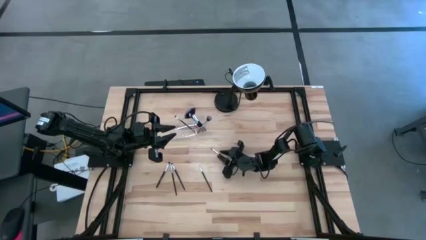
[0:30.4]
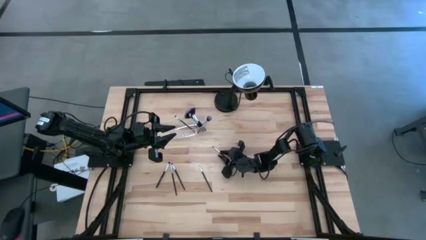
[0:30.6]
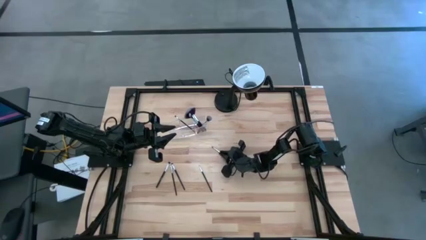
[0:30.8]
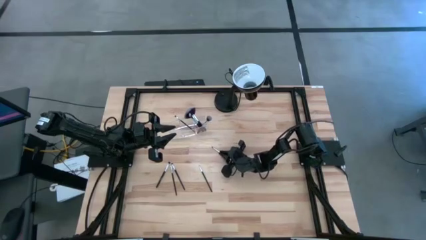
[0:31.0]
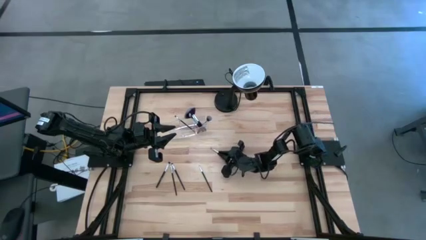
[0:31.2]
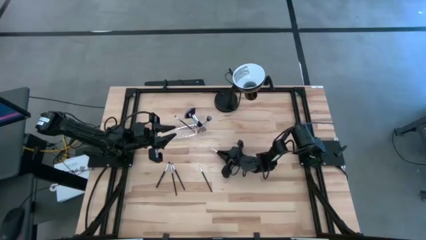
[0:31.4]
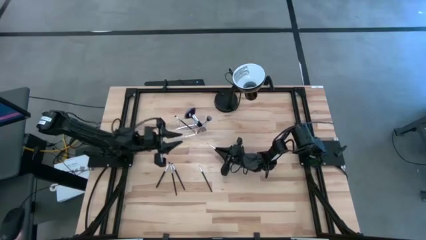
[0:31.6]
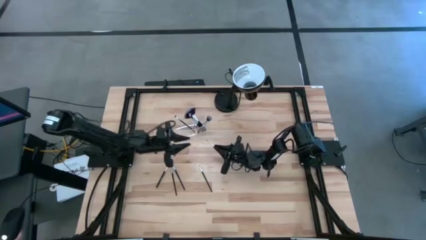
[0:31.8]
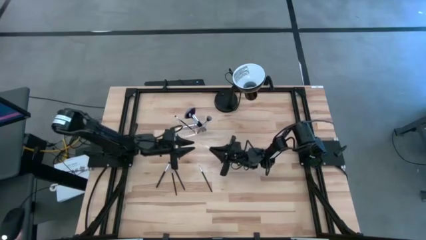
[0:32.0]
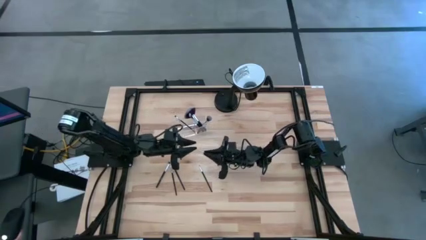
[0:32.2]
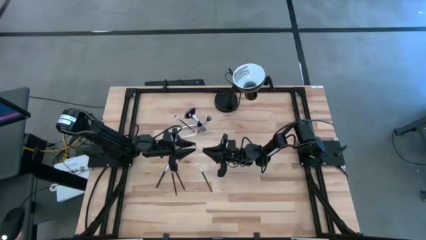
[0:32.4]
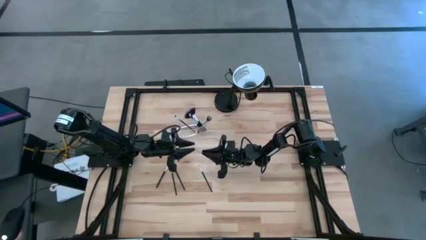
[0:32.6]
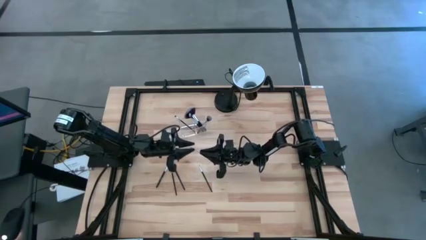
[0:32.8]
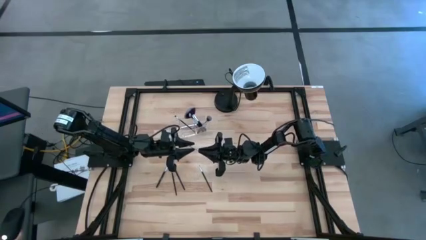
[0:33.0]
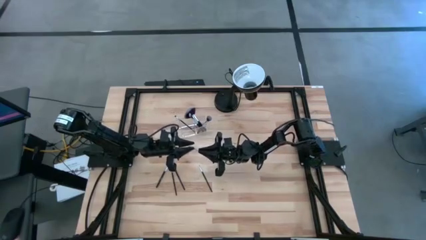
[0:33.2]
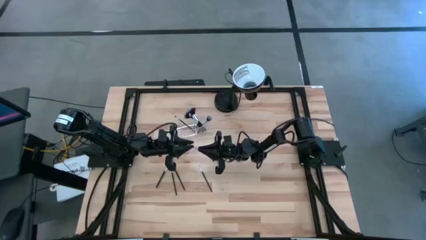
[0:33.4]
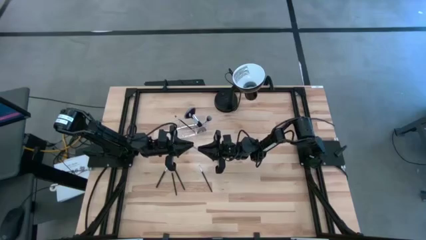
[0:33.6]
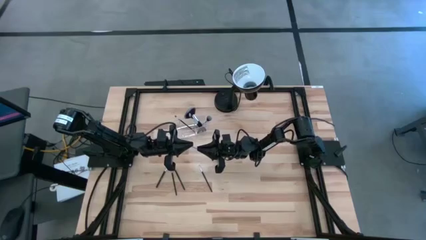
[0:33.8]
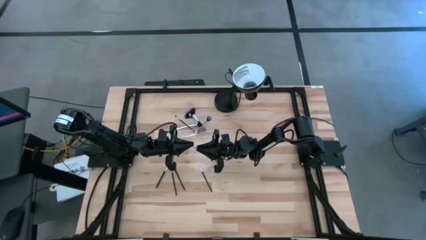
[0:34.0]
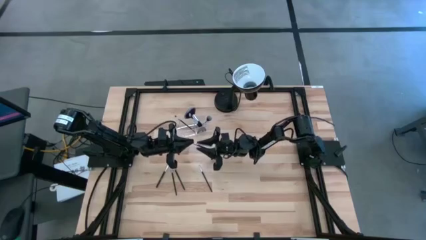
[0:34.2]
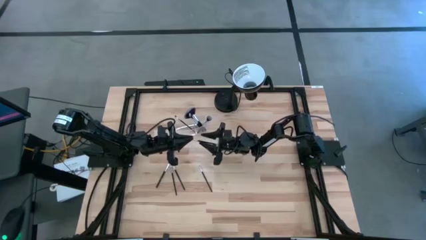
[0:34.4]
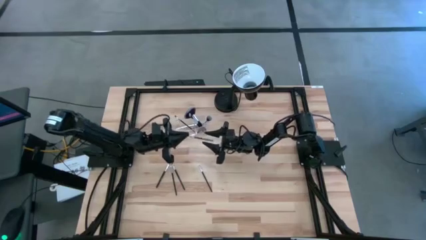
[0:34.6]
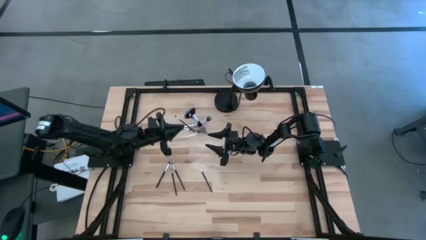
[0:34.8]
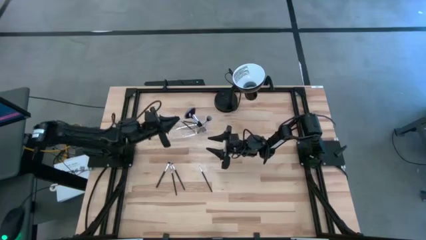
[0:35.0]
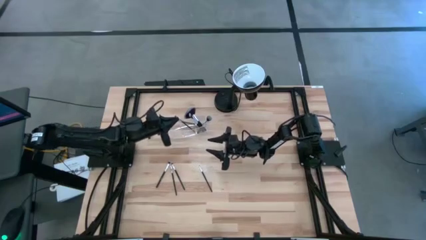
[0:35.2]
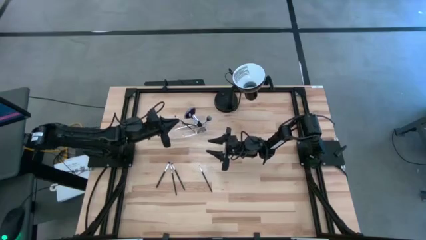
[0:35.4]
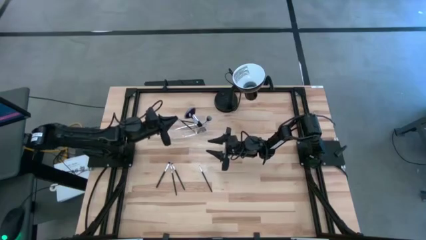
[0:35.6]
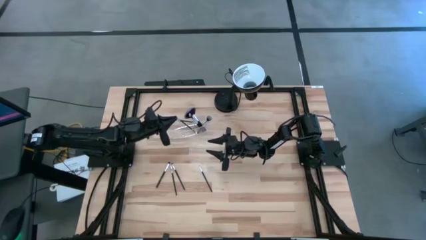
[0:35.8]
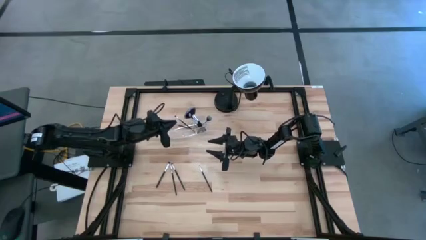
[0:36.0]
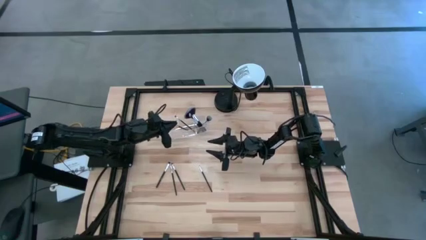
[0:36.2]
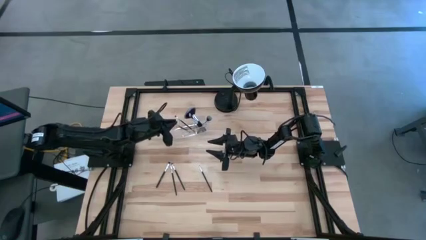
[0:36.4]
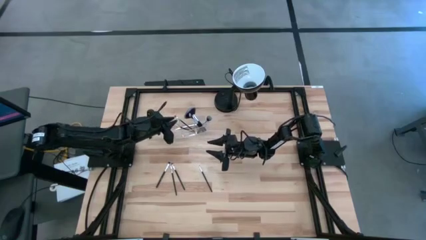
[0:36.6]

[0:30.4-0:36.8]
Task: Put items in baskets/containers
Put the black eyeshadow brush into the transparent organizer

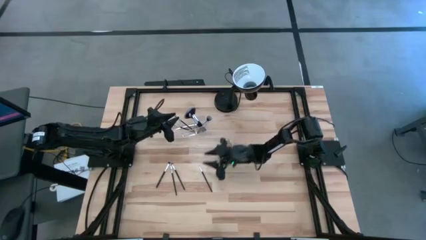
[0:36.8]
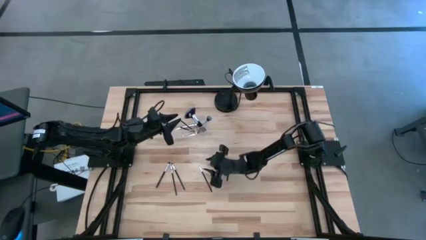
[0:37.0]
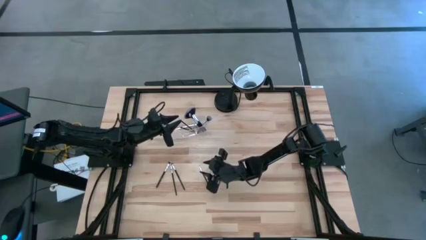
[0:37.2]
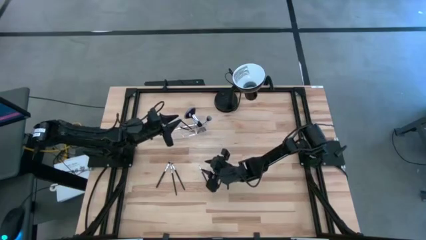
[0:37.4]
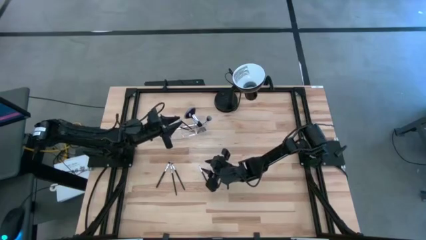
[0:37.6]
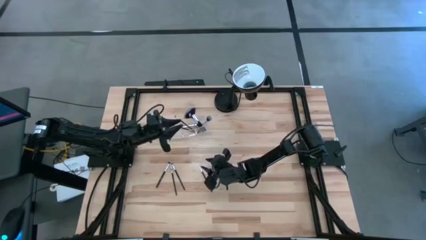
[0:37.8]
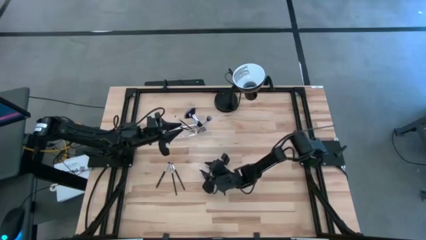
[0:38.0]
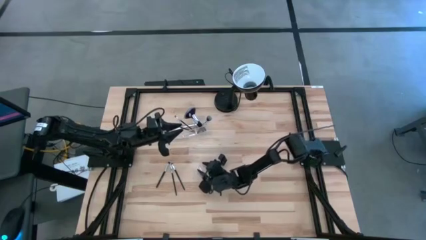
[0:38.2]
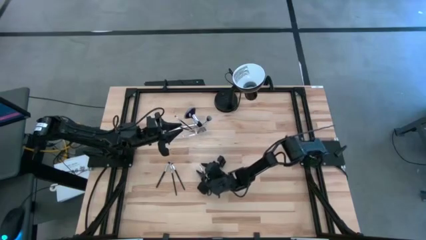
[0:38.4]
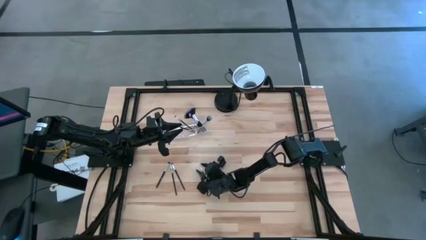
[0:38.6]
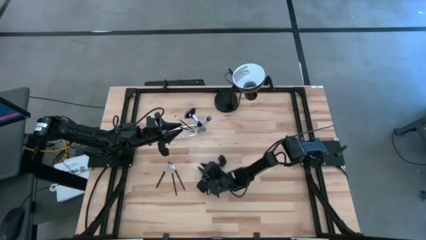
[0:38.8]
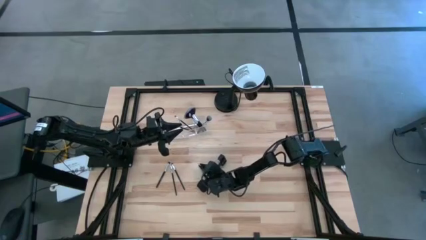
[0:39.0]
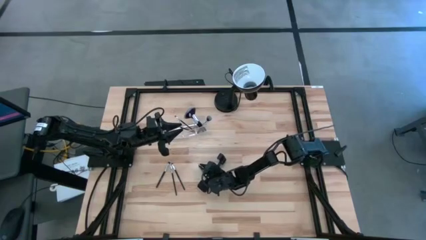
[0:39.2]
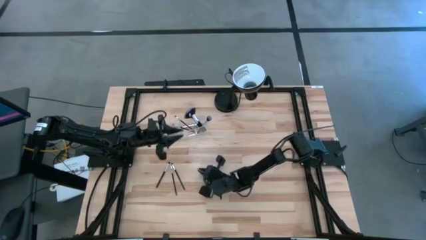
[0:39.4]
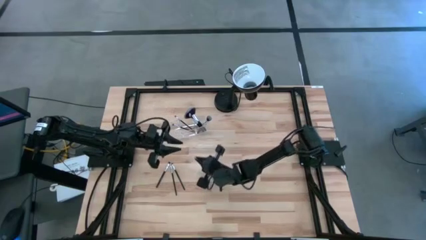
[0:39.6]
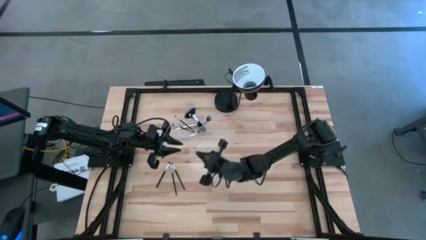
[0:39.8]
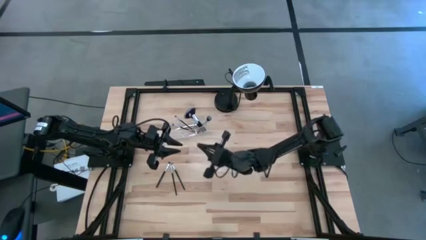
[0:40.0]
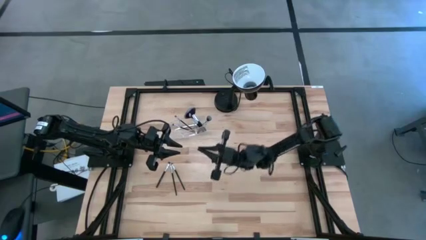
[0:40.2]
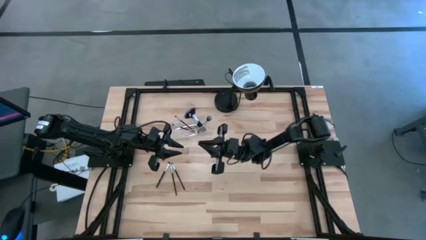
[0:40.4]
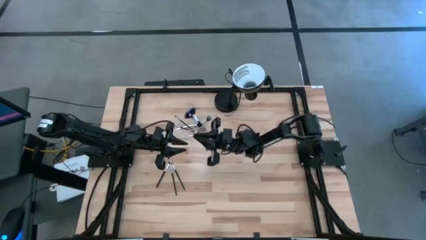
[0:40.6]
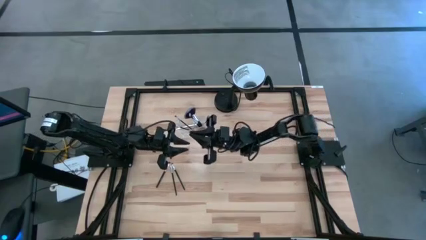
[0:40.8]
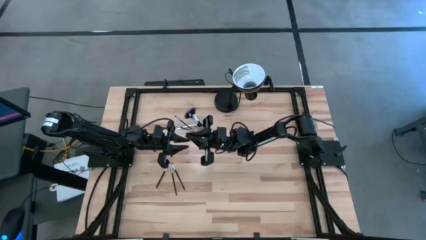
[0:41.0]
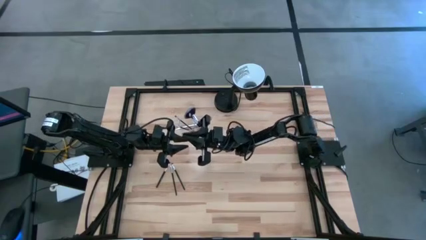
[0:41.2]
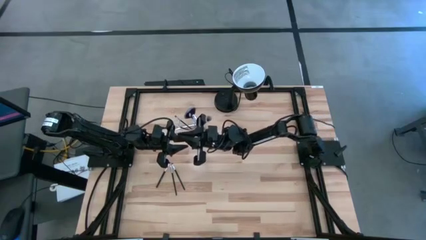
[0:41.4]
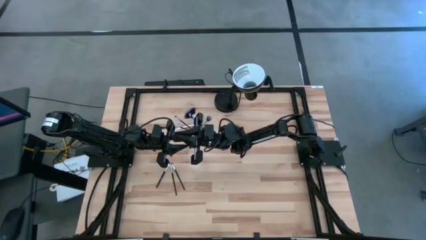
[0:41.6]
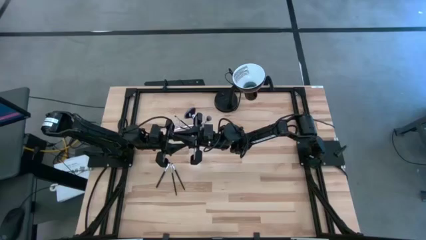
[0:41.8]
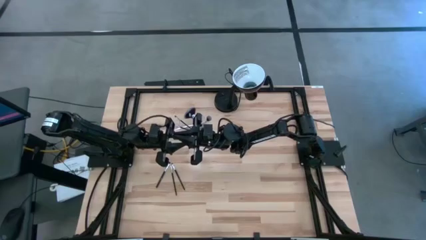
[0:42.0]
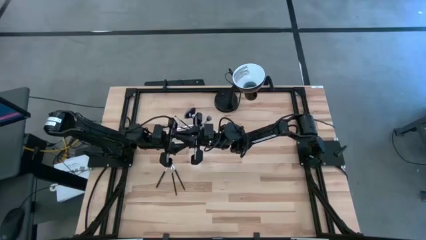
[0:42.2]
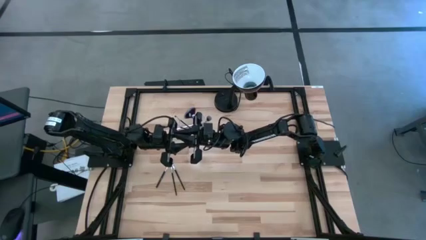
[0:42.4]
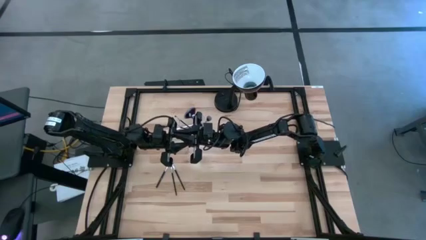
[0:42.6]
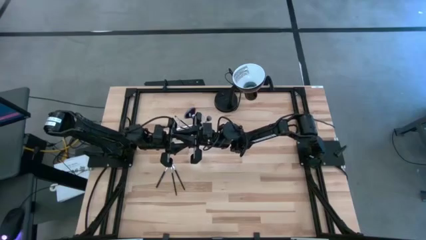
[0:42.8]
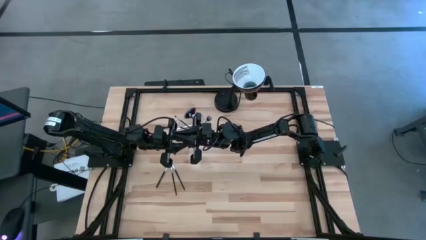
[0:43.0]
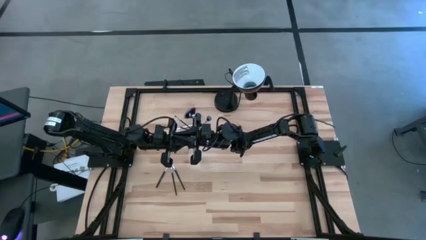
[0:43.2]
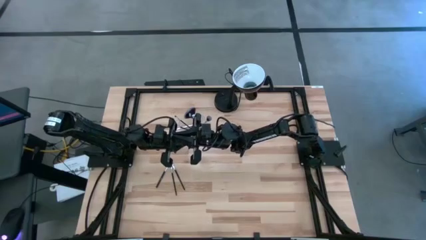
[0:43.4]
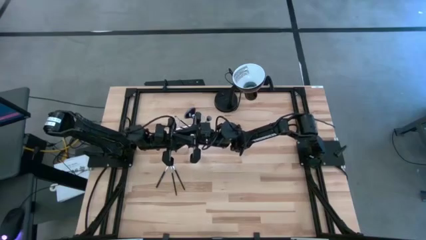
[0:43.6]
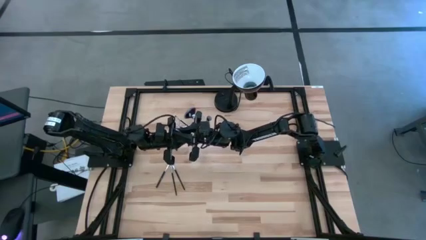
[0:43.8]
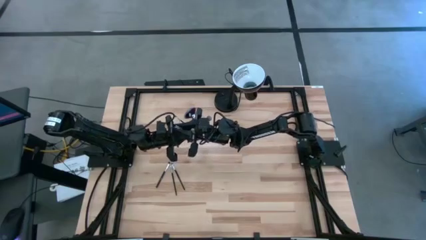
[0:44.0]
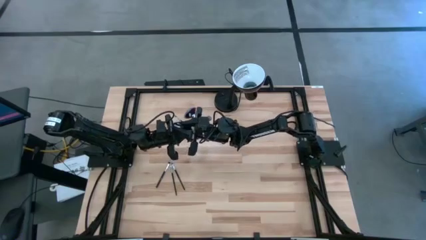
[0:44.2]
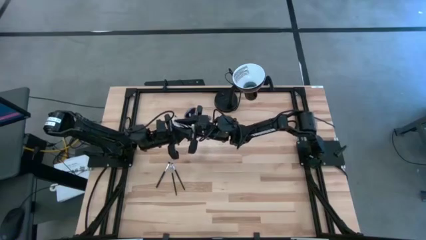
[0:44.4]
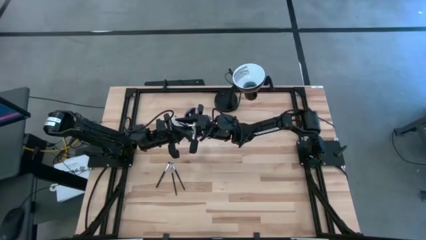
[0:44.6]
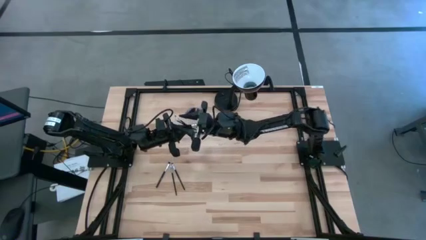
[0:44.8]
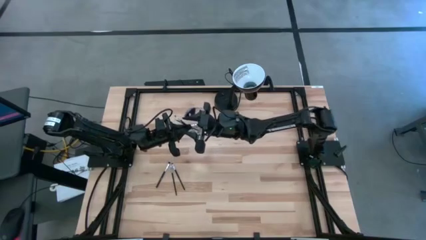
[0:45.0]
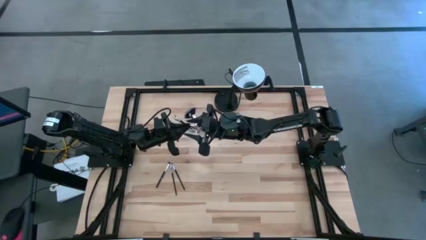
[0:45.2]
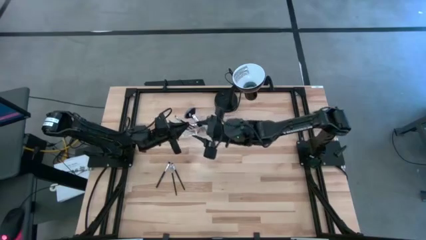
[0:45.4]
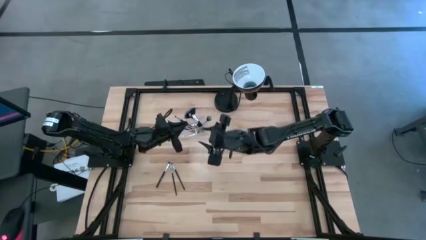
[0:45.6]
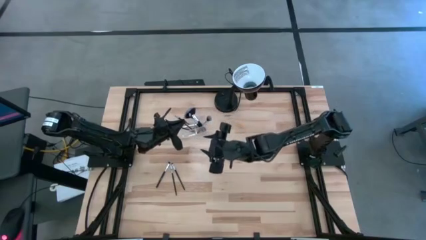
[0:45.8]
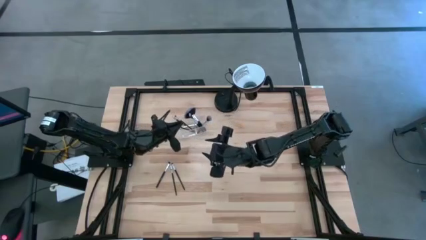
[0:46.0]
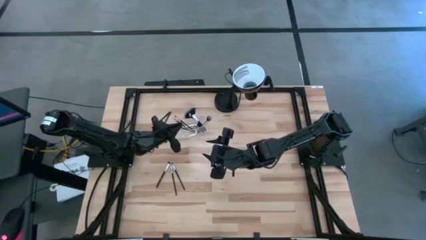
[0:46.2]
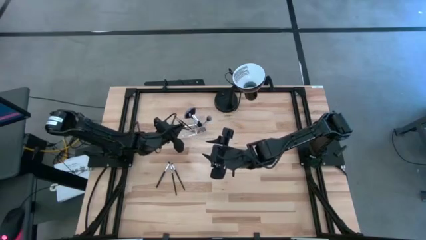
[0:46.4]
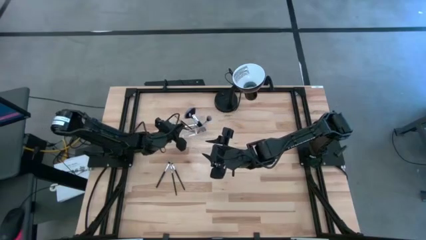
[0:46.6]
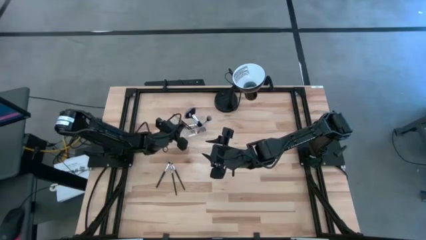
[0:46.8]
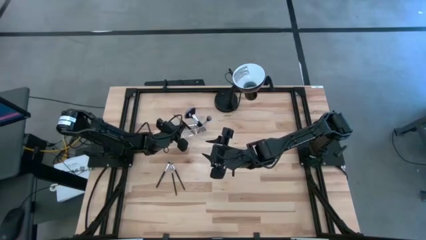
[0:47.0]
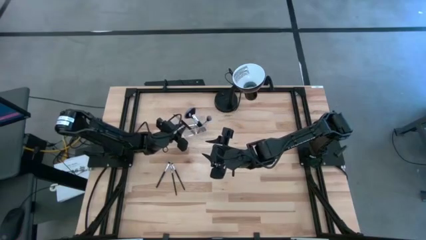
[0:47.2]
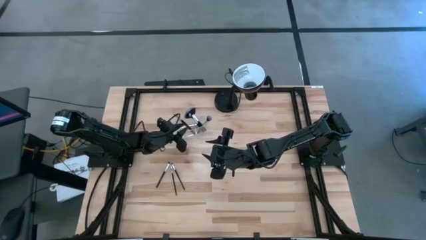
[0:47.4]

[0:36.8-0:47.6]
Put the black liner brush into the transparent organizer
